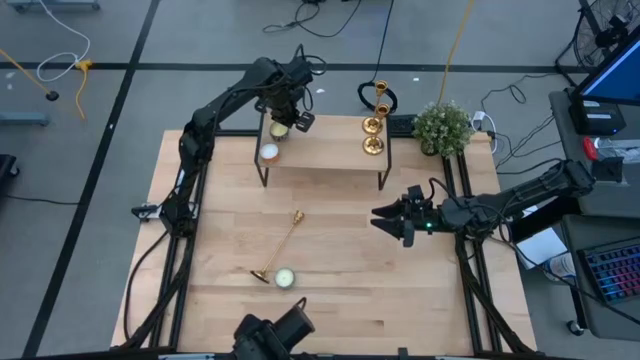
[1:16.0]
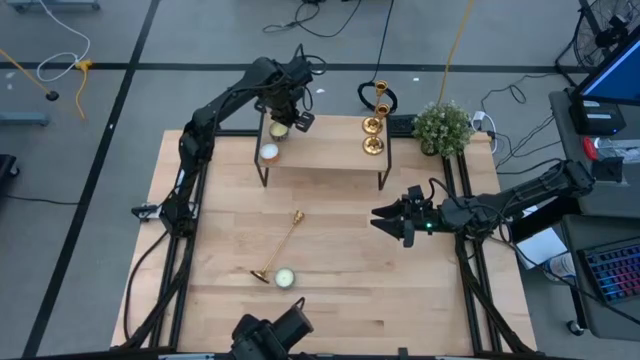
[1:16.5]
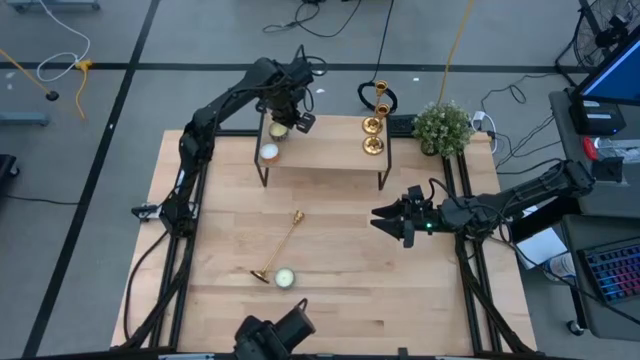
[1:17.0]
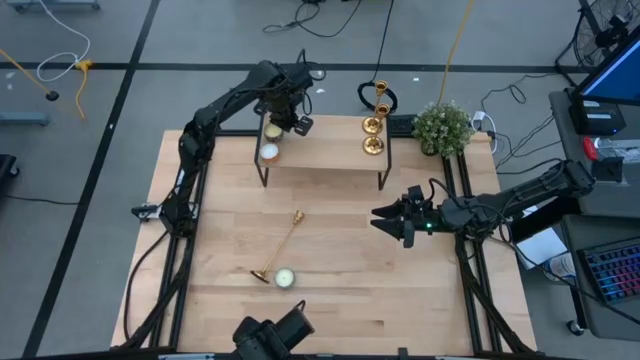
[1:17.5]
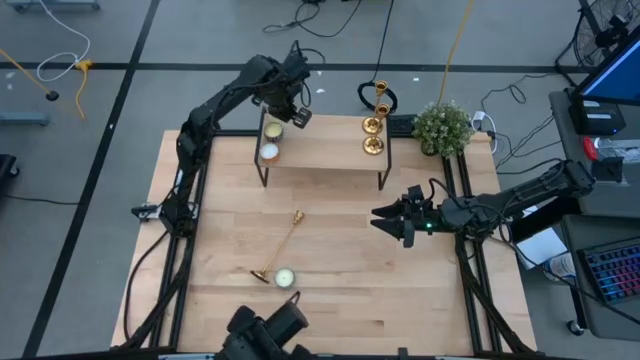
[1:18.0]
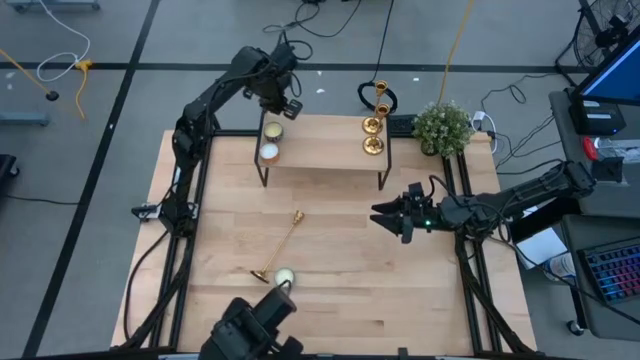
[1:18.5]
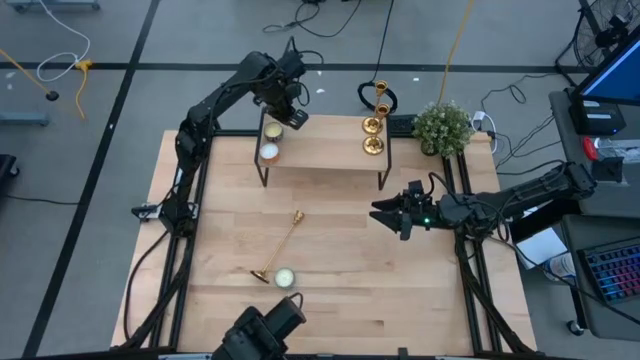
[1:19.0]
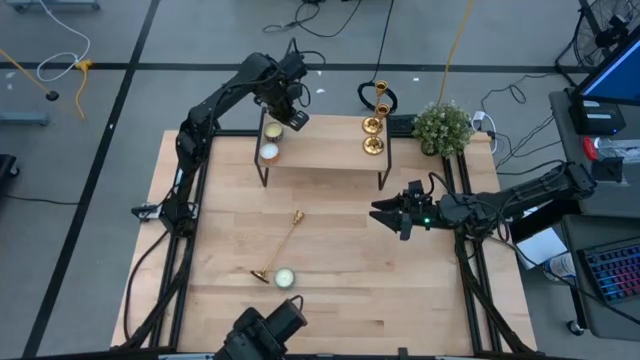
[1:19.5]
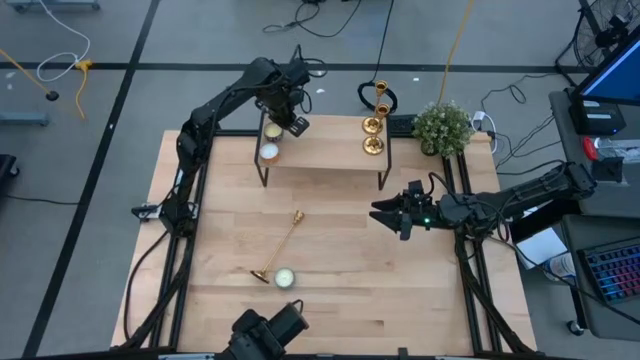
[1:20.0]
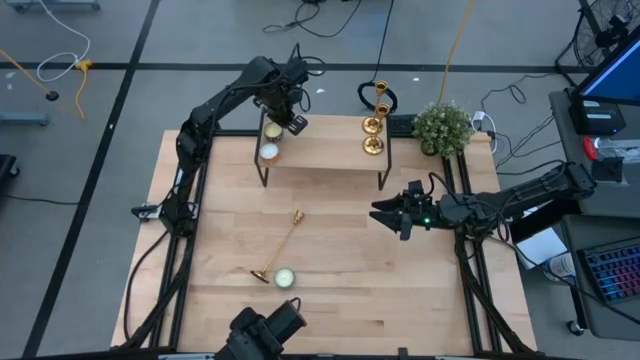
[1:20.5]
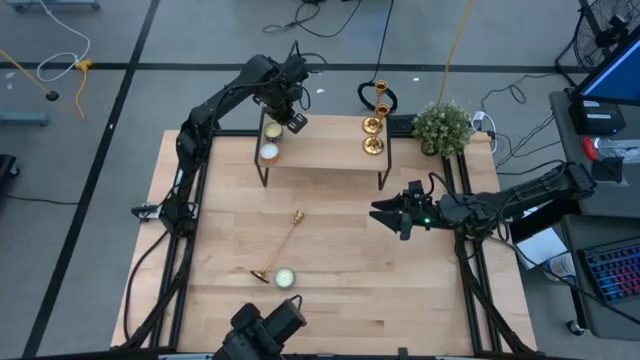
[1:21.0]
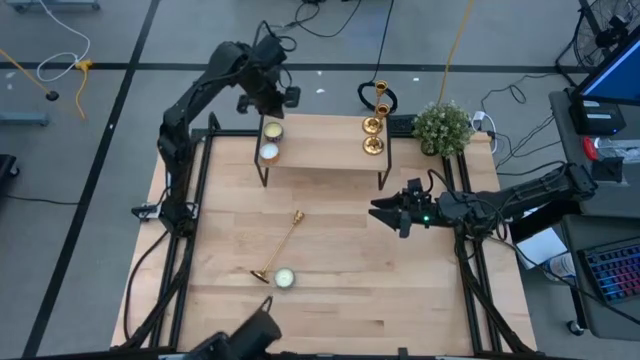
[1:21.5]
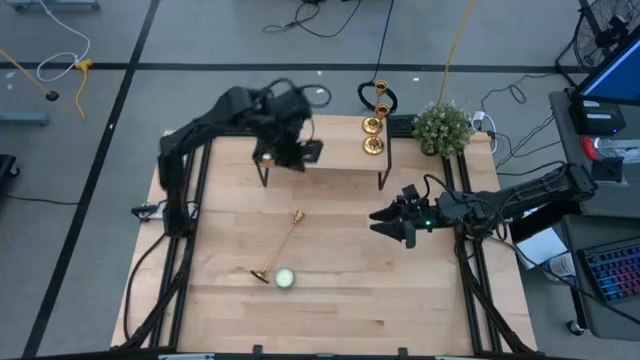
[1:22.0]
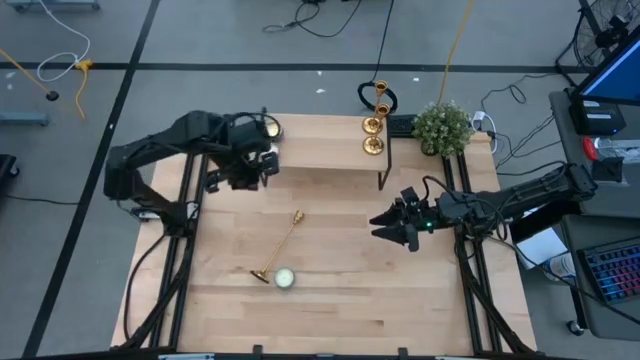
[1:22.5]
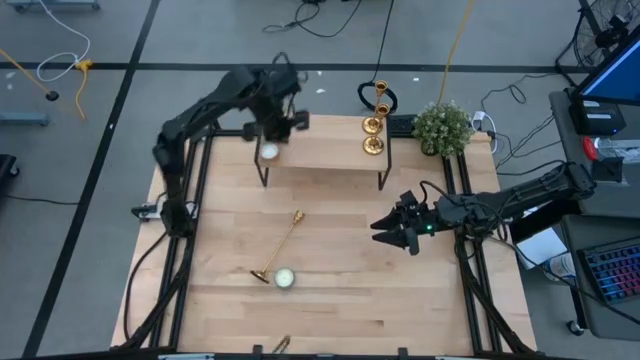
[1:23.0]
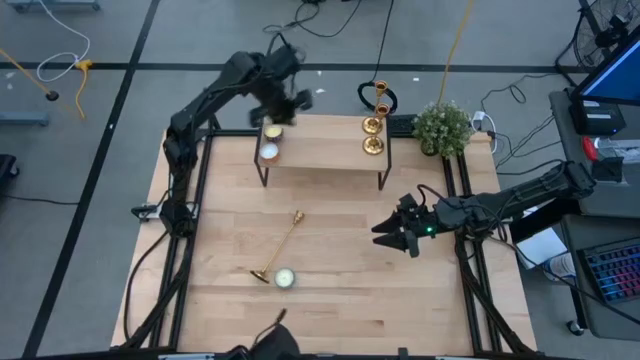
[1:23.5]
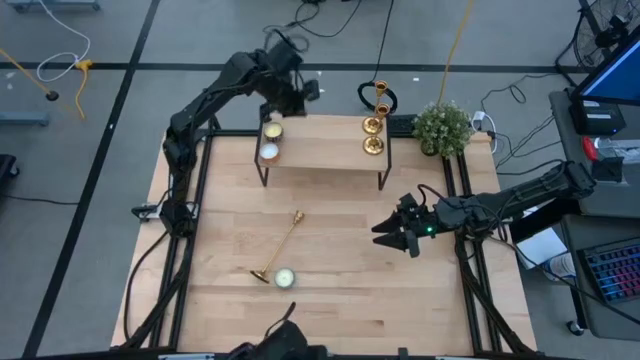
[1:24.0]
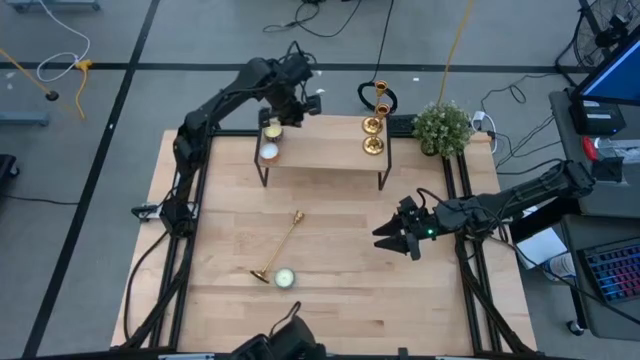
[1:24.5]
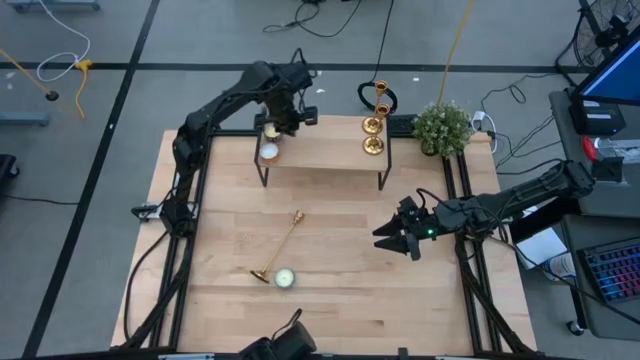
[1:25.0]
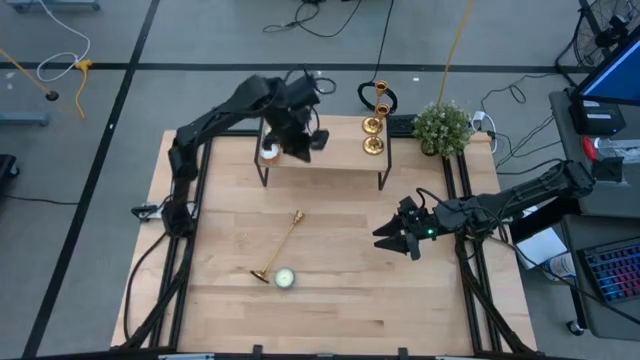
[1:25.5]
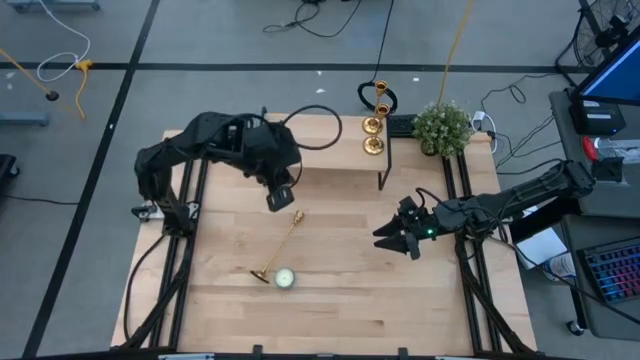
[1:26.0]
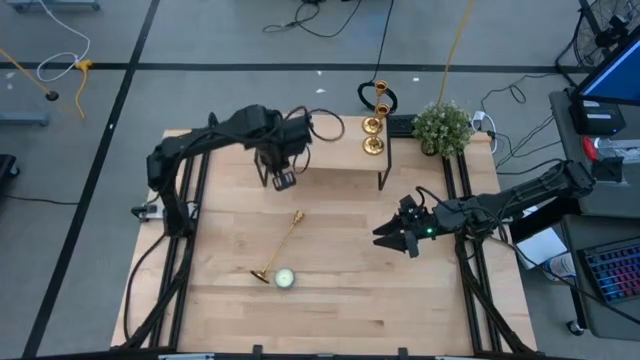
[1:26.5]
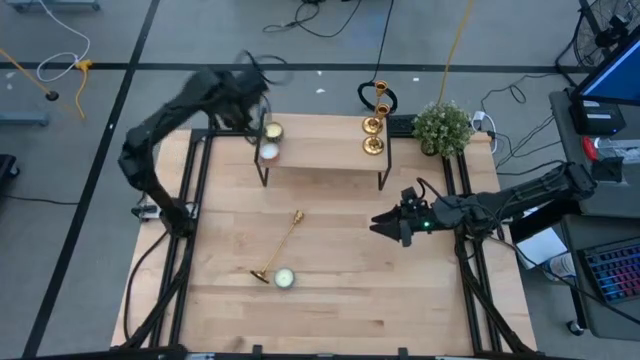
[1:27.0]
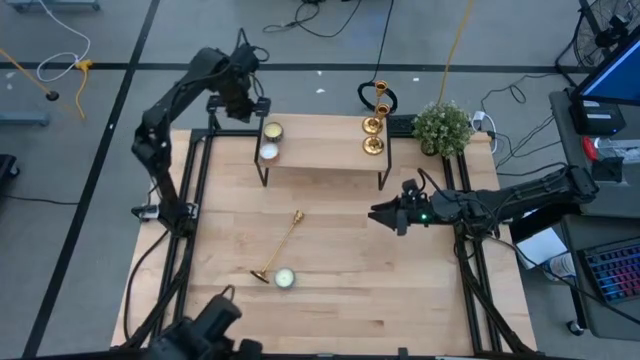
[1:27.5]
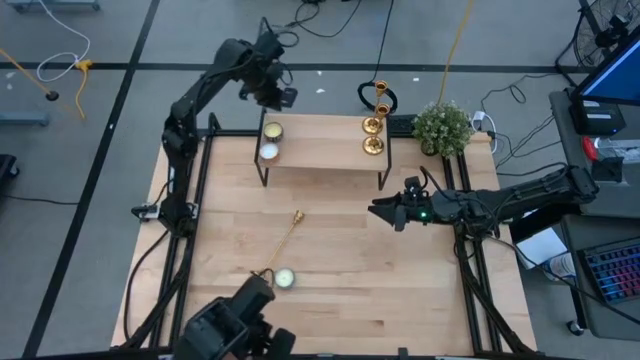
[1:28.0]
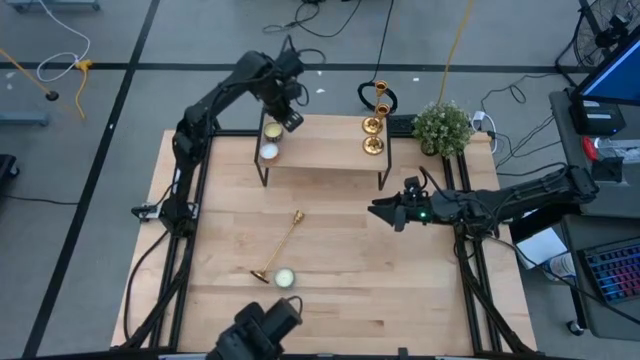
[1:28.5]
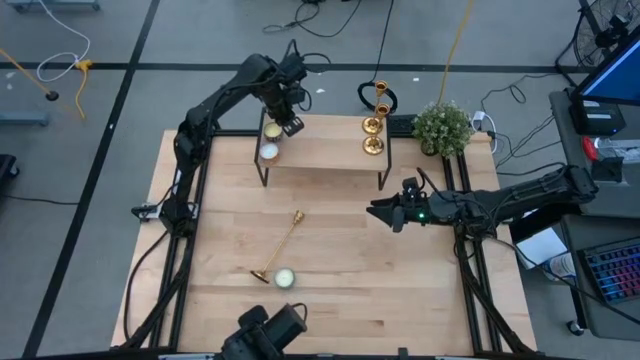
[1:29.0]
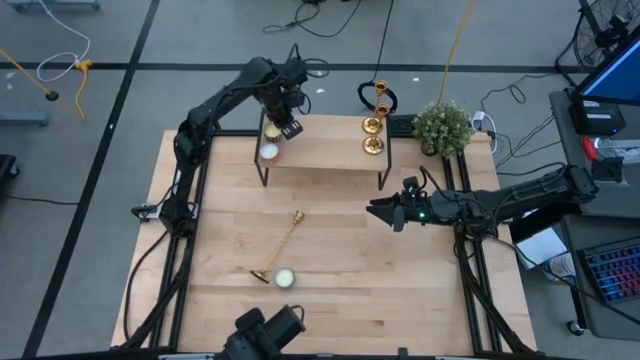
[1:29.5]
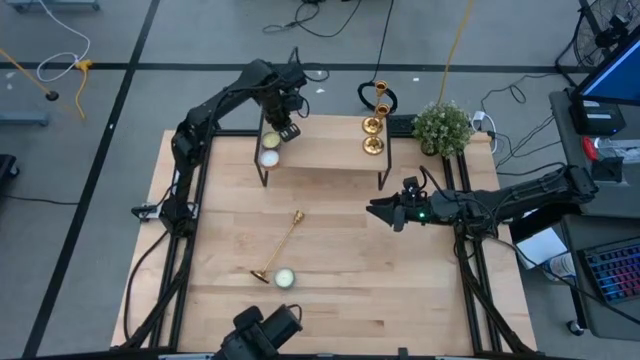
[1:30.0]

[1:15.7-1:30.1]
Task: Pick & Place candle stick holders
Put the black scented candle aligned with the orange scented candle on the shelf

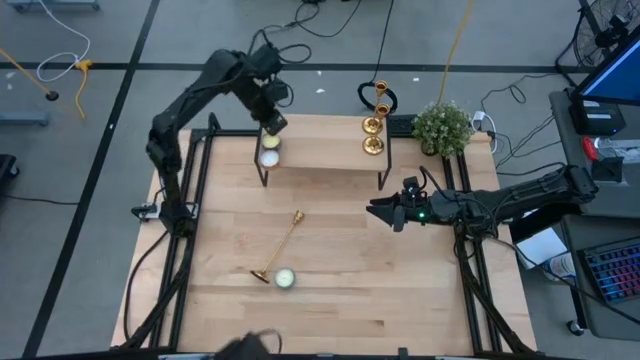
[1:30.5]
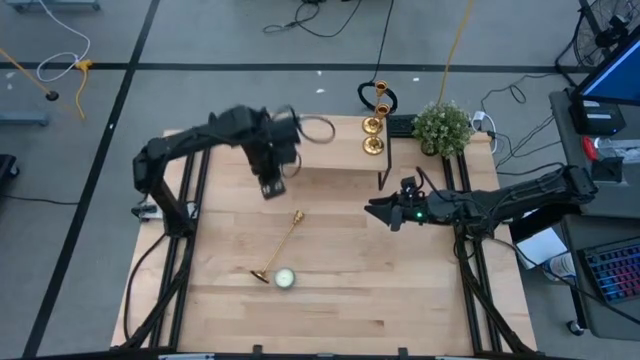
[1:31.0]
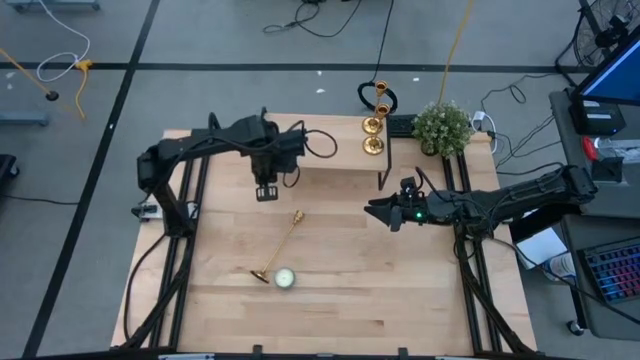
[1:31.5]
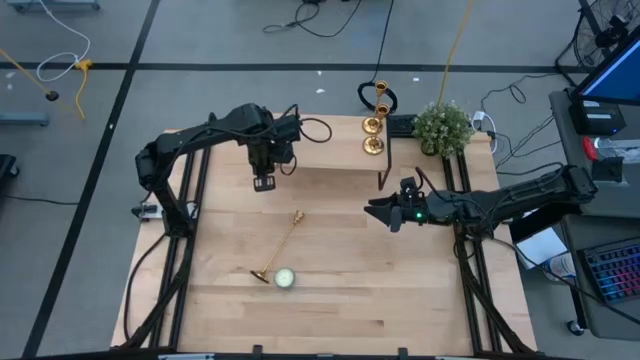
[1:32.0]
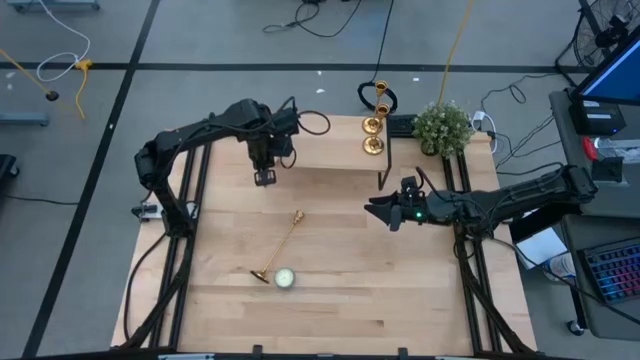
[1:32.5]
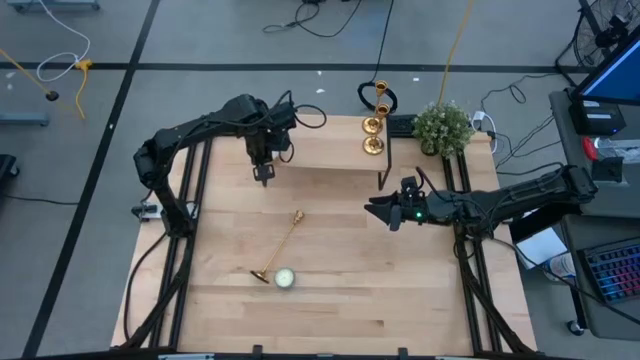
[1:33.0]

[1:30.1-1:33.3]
Adjust the orange scented candle on the shelf

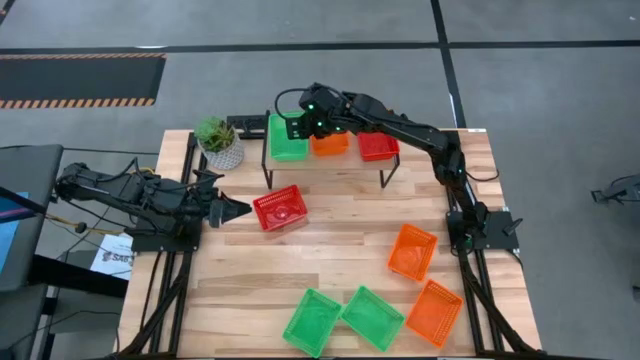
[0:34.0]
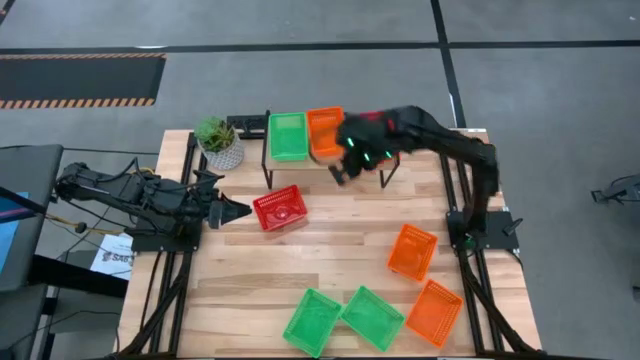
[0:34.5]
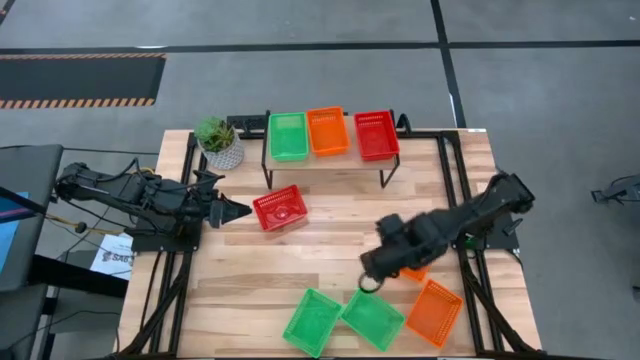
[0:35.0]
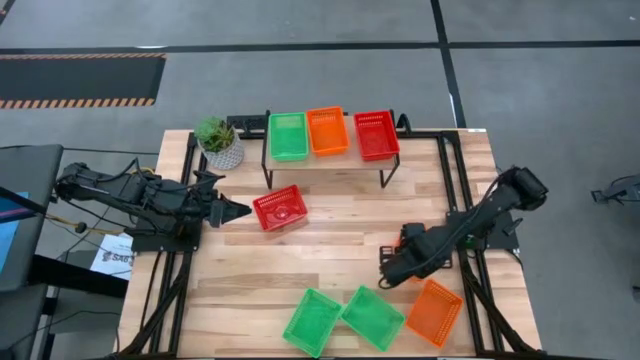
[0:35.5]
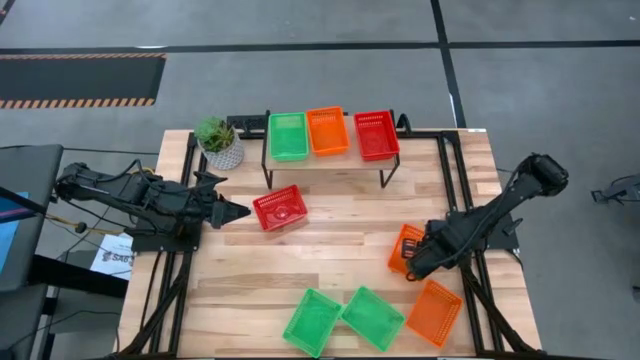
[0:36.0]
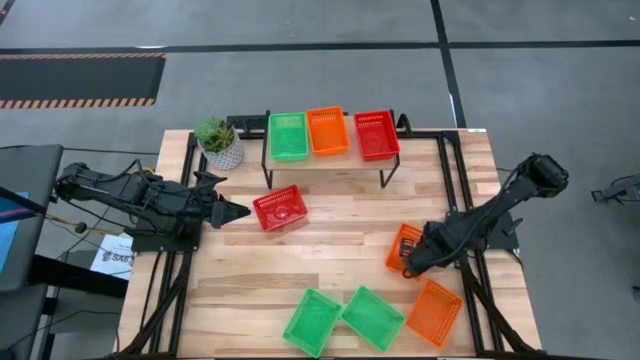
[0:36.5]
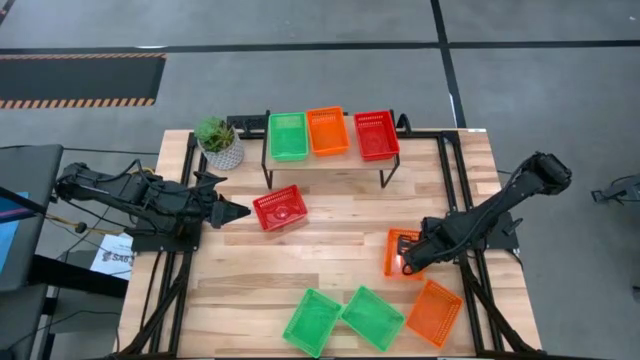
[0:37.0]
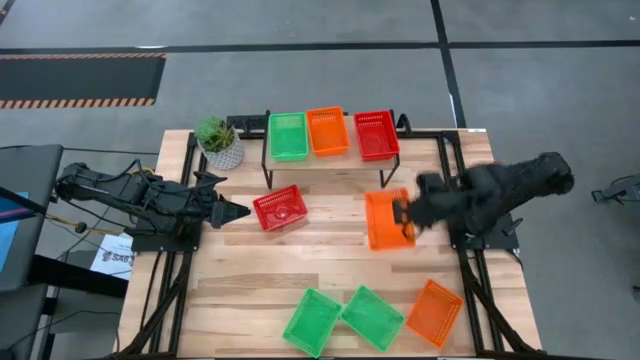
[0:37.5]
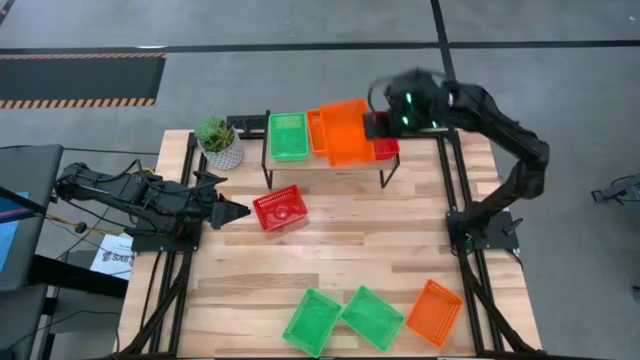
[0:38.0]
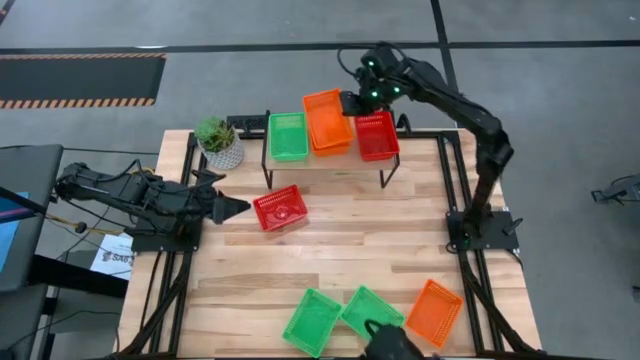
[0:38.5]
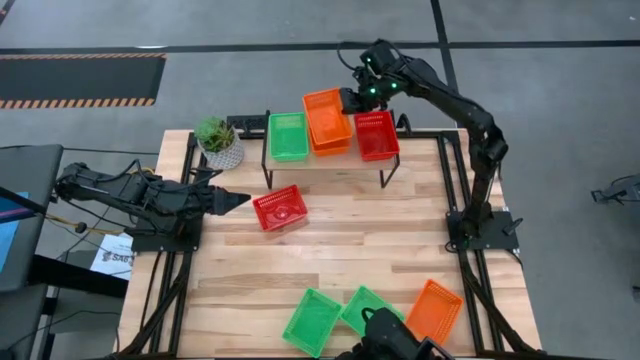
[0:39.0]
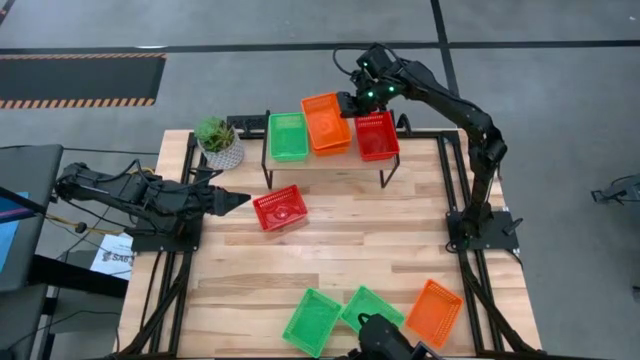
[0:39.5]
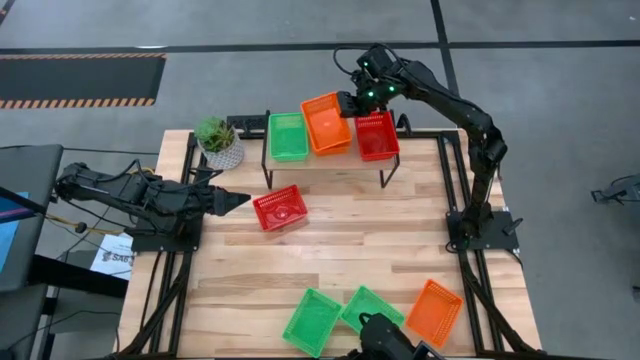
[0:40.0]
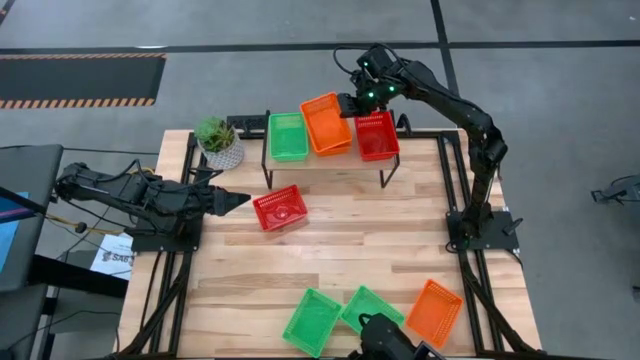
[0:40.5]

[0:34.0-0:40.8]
Task: Stack baskets on shelf by color
Stack the top orange bin on top of the orange bin on the shelf
